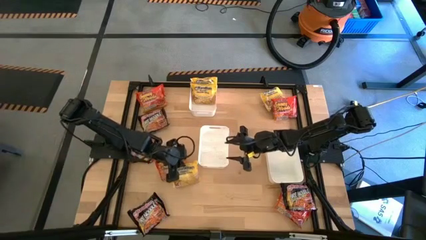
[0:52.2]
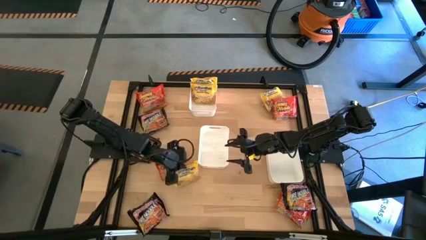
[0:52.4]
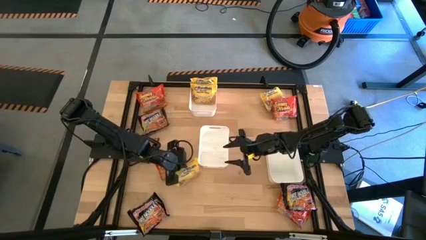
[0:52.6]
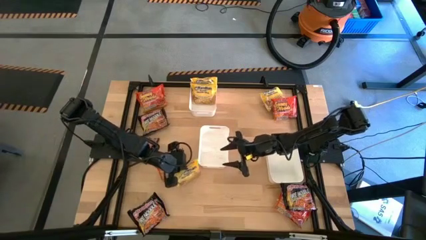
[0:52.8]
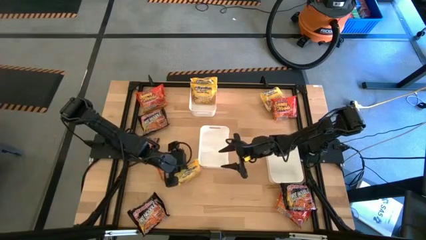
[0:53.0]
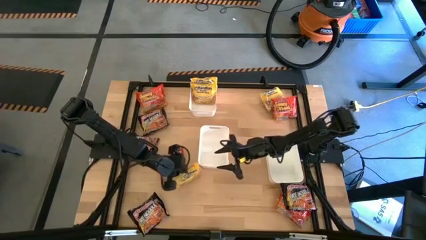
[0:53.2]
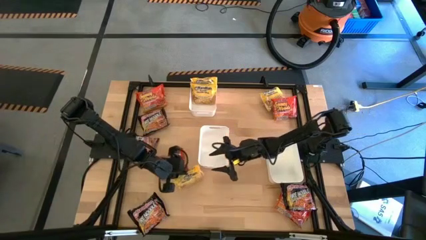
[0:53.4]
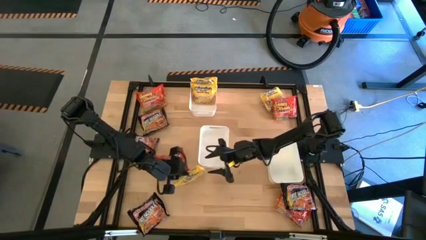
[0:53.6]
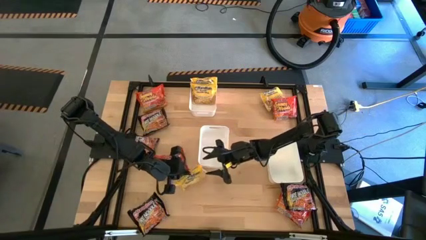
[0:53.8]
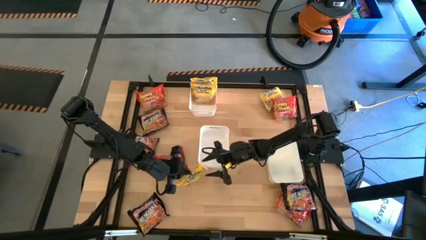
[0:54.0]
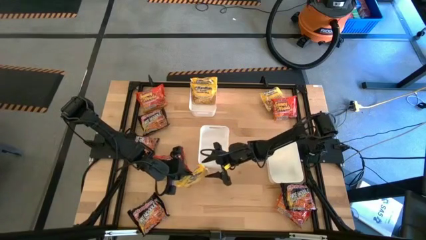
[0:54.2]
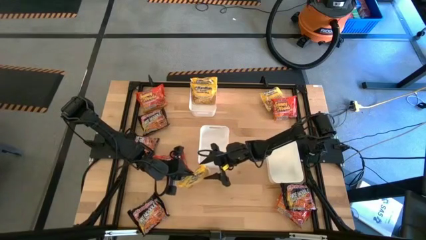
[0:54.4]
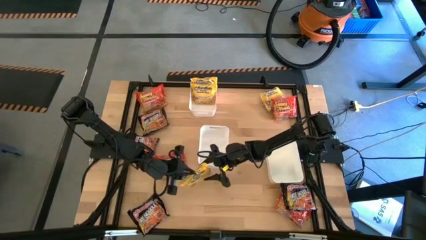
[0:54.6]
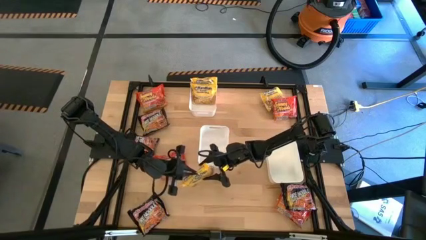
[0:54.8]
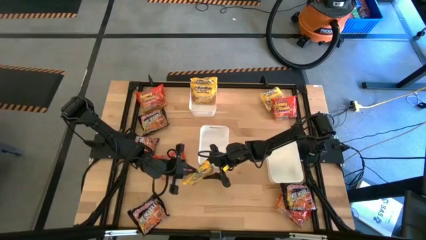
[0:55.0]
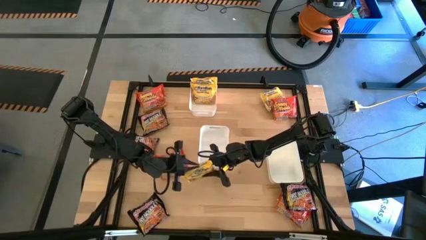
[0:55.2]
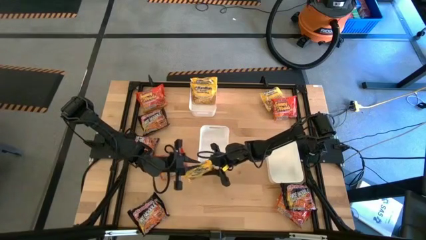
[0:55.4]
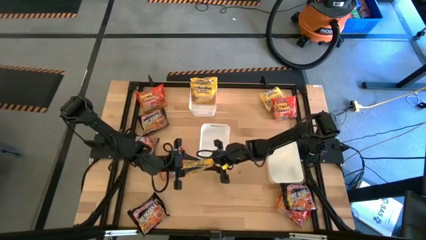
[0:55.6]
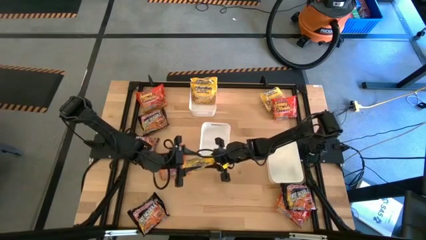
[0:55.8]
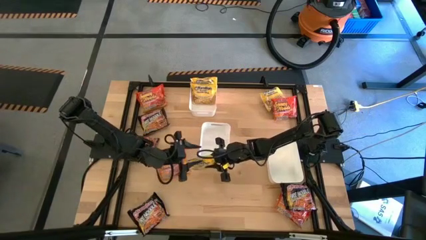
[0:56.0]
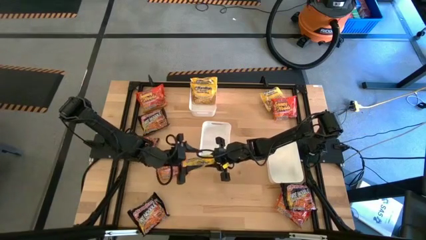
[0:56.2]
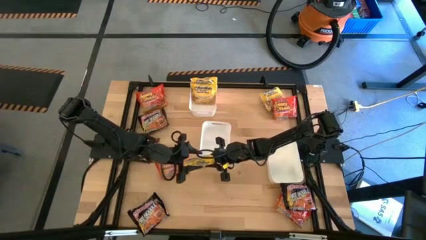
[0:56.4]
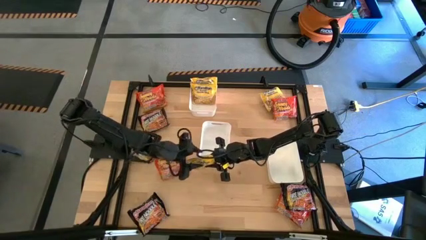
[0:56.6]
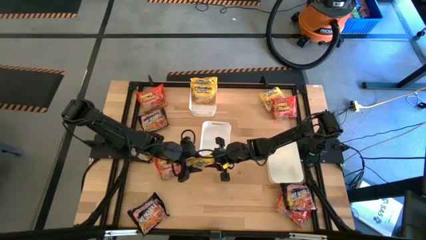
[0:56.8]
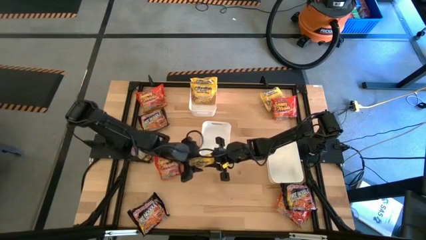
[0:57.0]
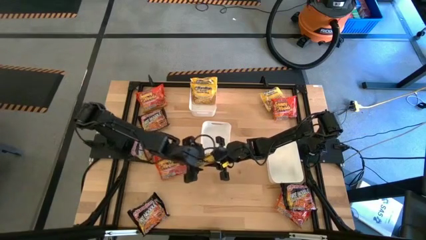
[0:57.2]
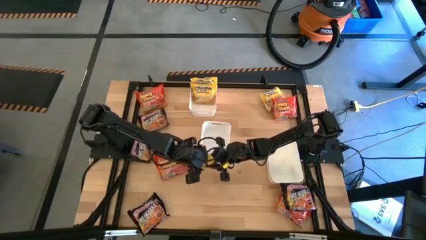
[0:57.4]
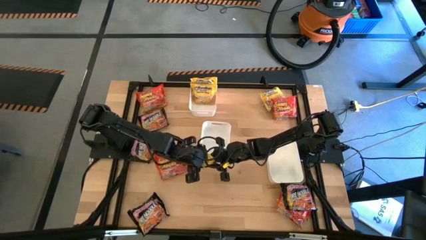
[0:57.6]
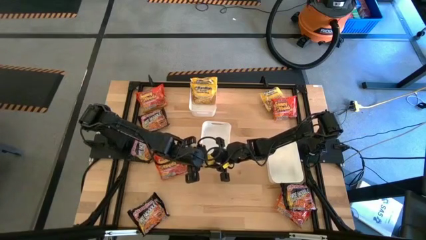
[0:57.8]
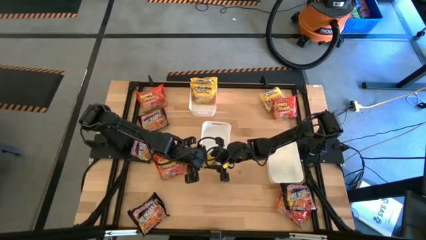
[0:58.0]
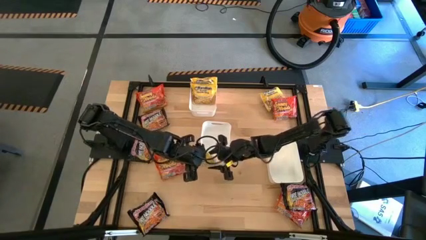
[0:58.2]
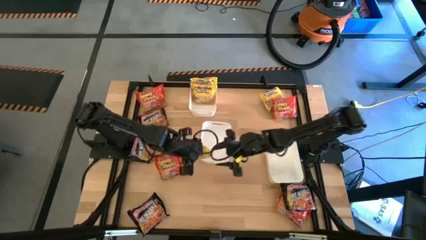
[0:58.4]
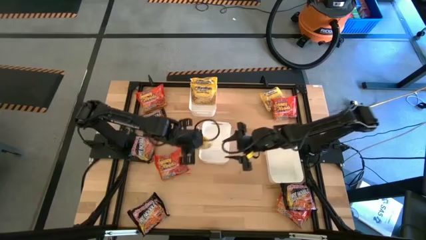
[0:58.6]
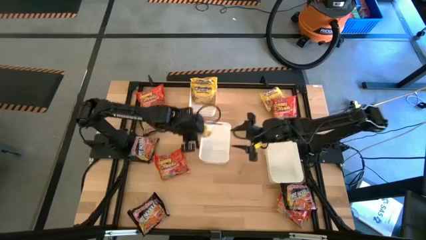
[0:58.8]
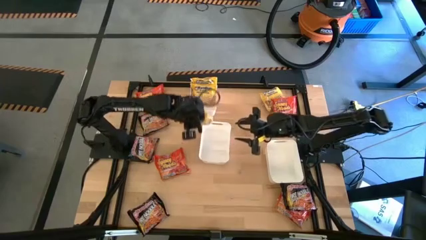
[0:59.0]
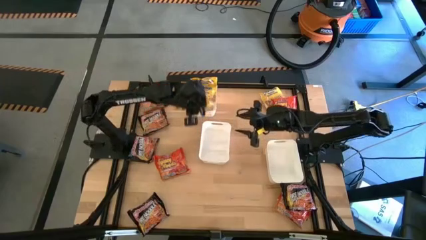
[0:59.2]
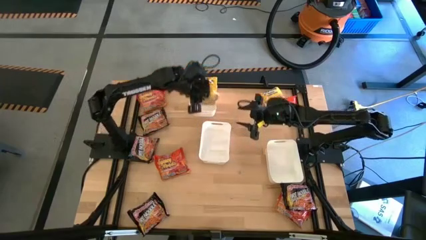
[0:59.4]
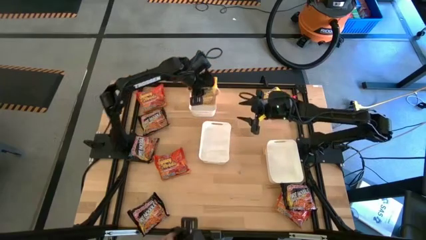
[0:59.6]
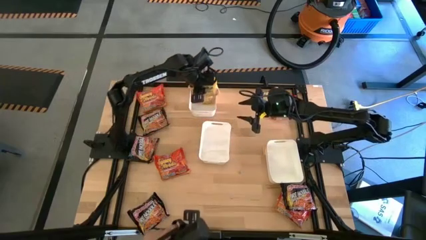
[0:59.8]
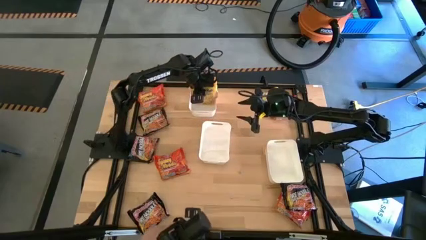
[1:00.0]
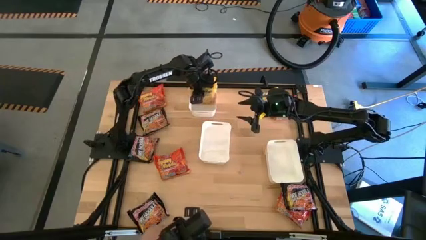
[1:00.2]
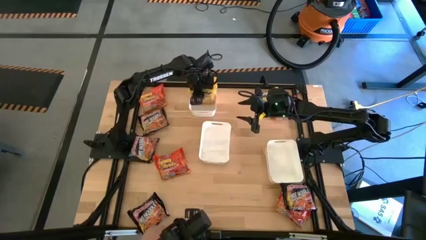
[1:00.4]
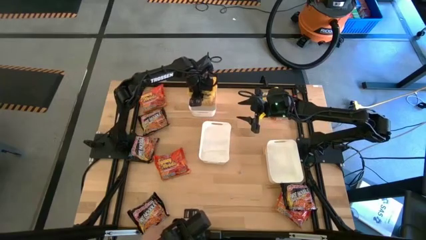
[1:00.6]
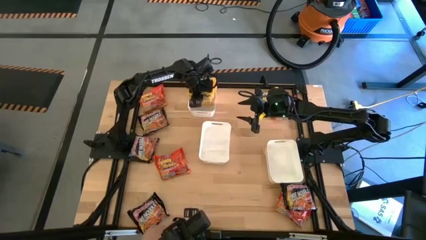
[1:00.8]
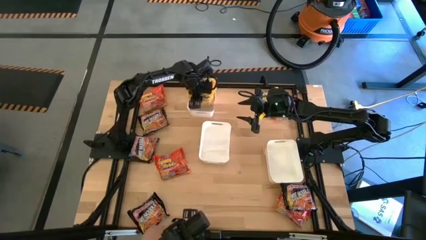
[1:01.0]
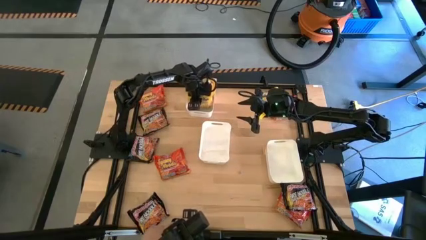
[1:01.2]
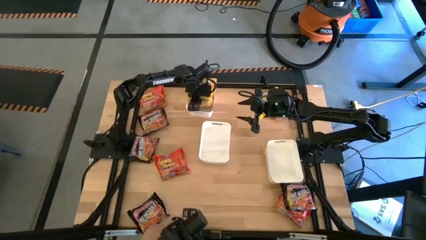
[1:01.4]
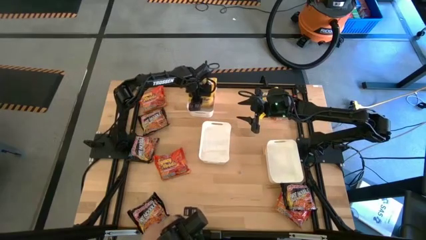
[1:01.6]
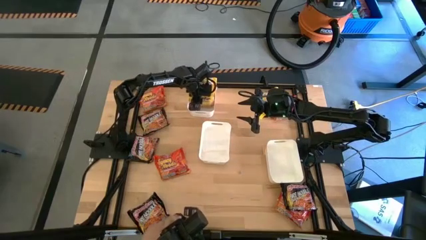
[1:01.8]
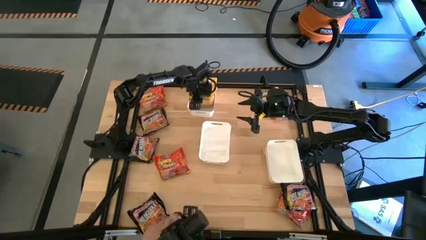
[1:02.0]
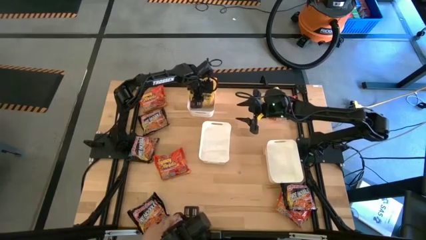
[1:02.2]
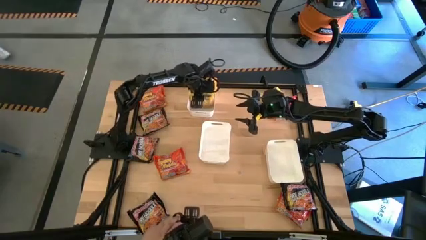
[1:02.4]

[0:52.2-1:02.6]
Task: Sort Maruchan noodles
Put the yellow noodle pack into the top white bin
